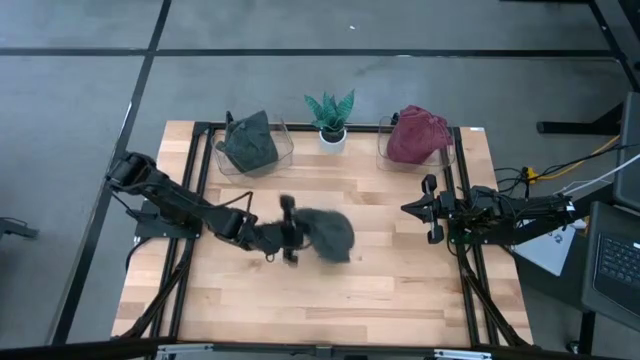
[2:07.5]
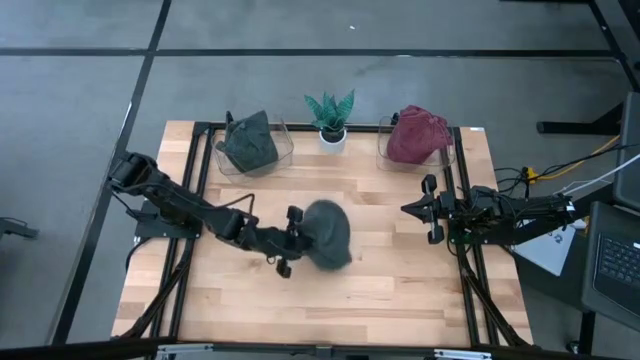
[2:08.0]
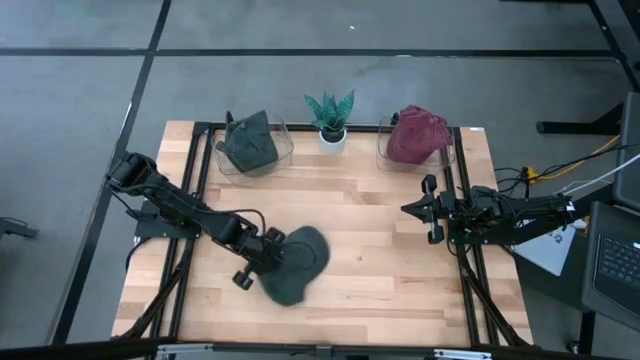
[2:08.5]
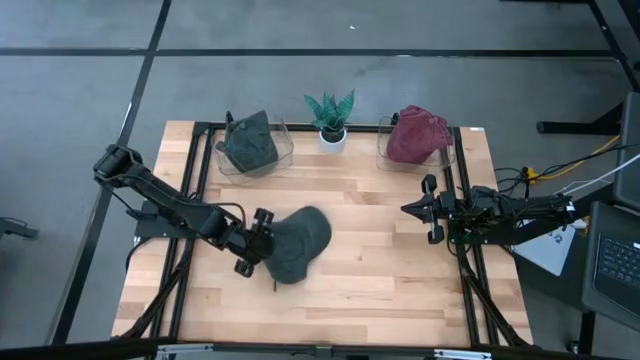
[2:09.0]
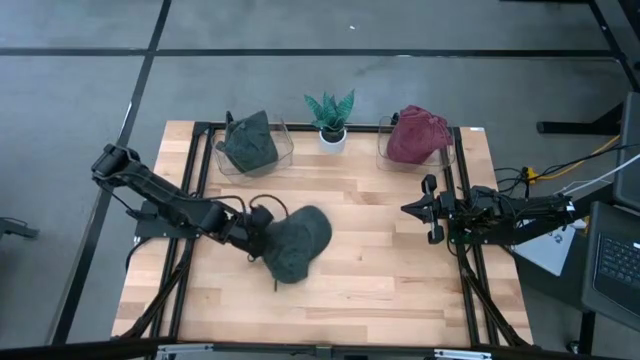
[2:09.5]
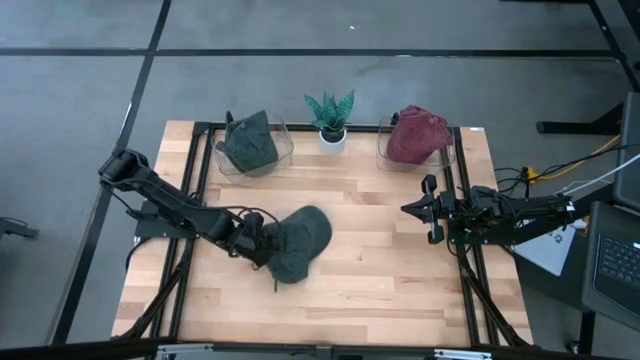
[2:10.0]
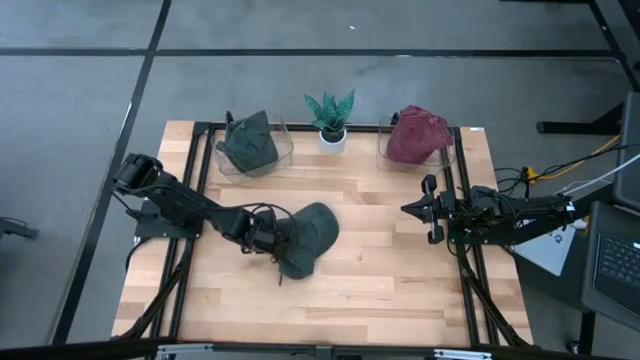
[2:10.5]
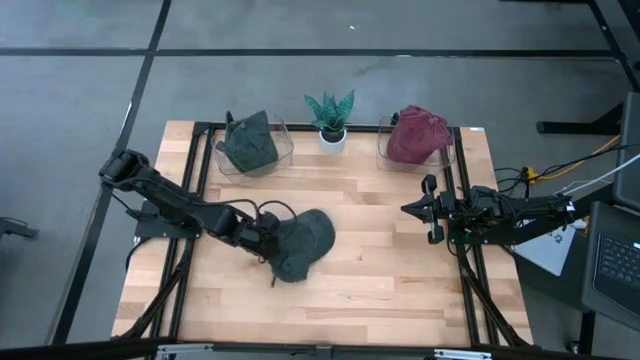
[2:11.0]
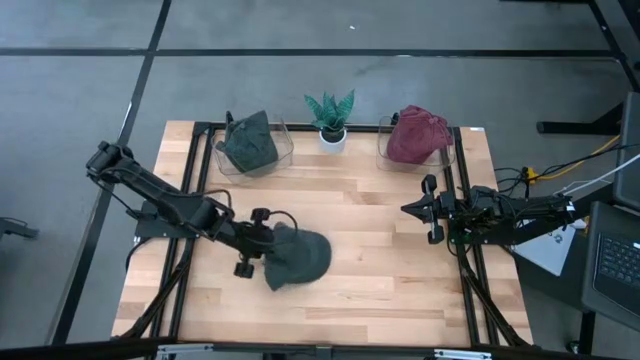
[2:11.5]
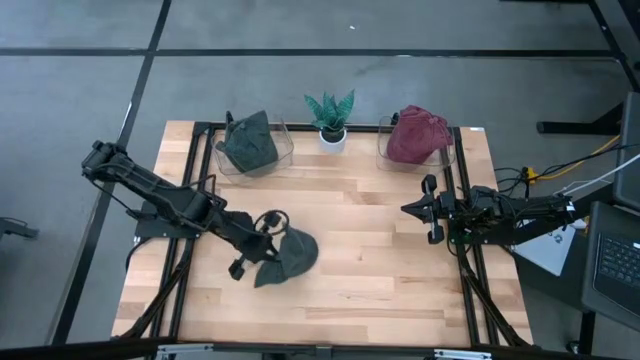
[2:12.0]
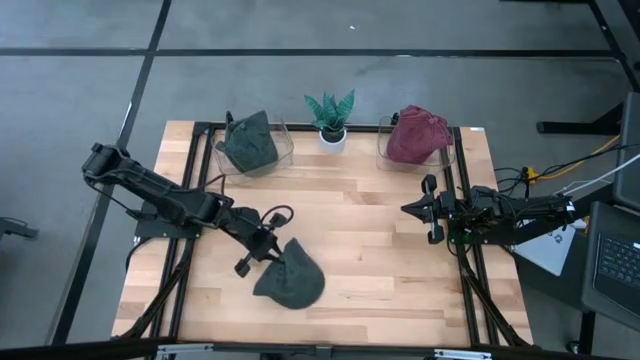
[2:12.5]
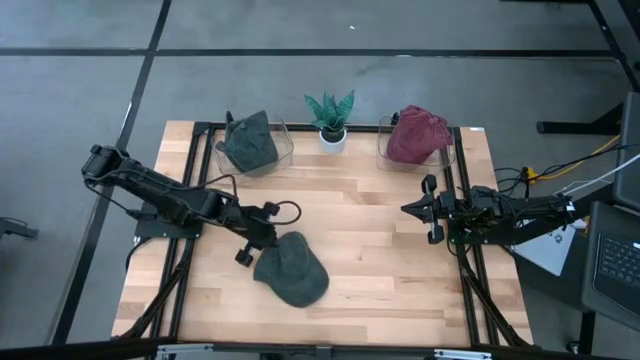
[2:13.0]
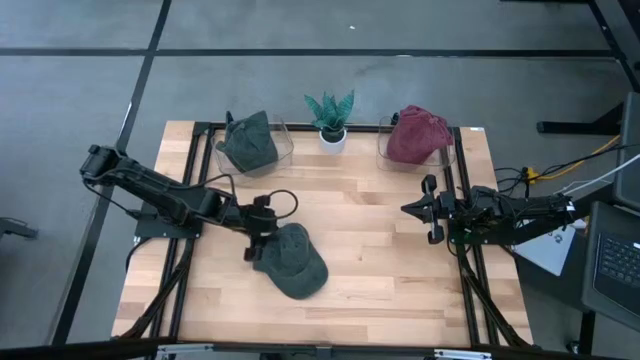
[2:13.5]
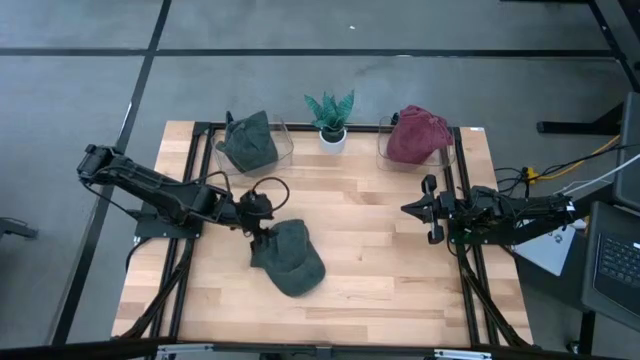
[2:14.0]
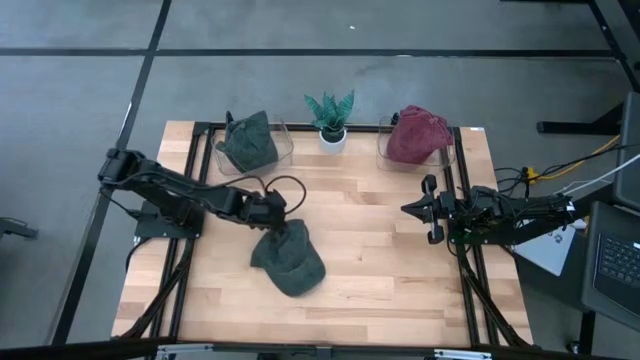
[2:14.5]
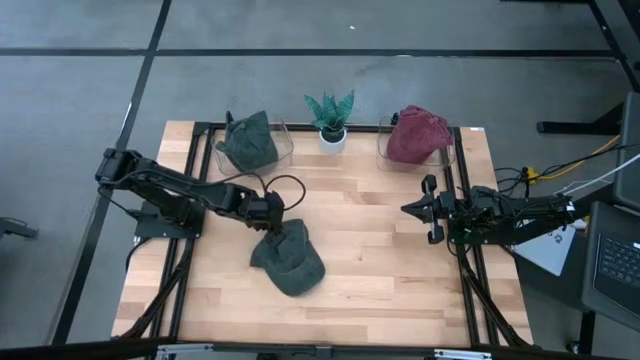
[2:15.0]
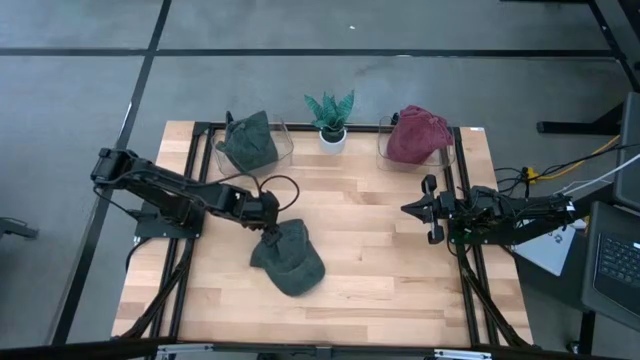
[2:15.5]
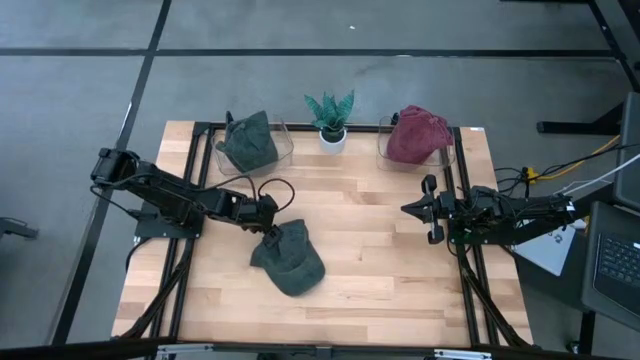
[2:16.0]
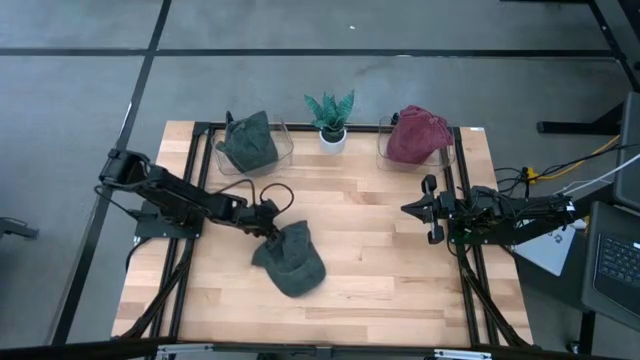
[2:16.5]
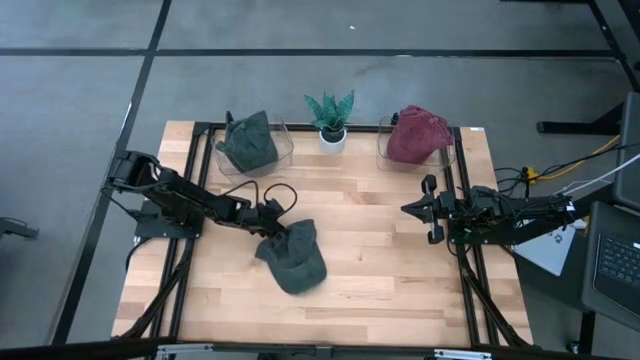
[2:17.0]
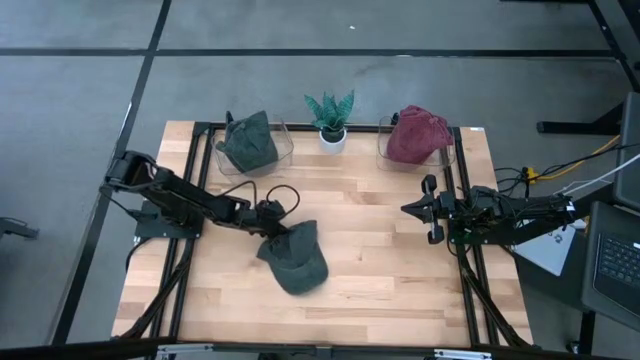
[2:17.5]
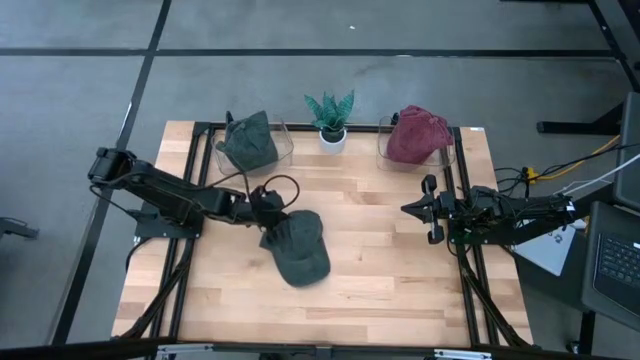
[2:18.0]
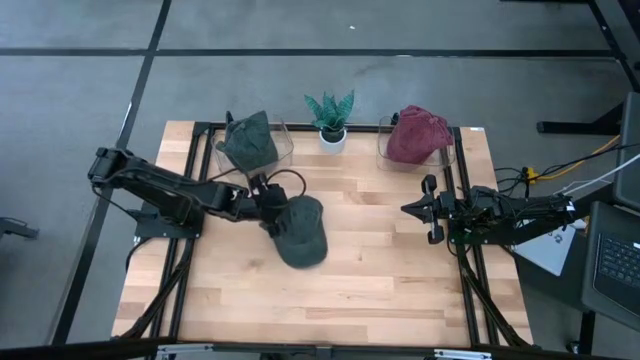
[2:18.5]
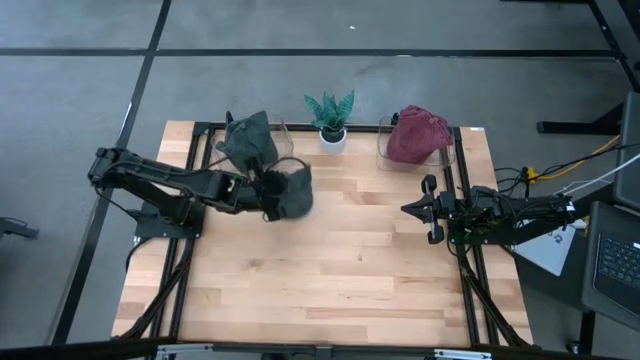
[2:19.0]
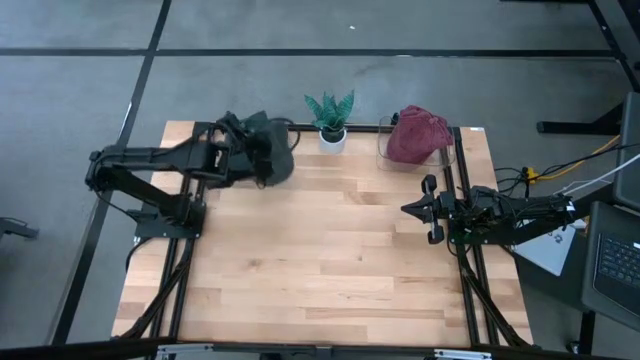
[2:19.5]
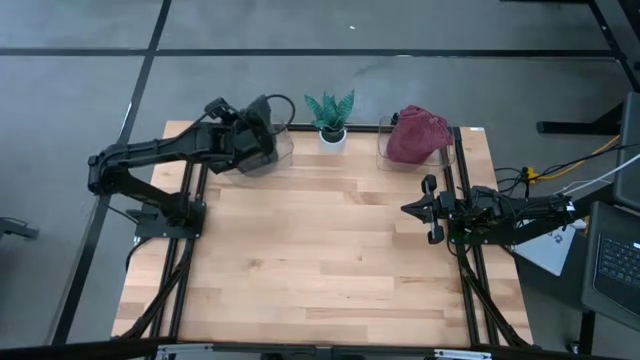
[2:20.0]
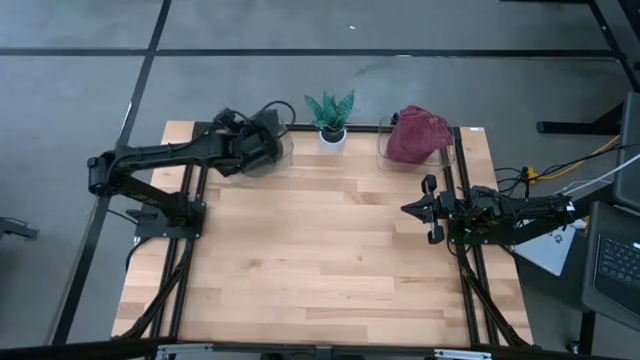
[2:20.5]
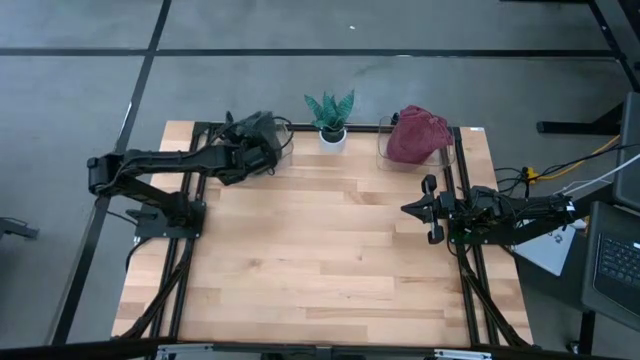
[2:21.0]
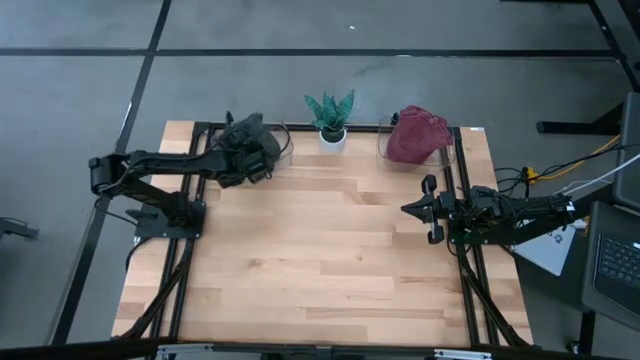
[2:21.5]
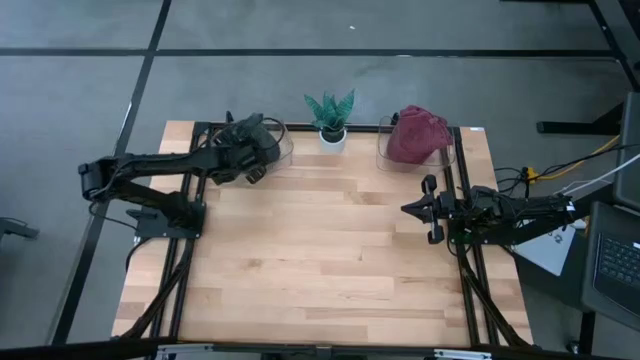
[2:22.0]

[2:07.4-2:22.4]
Task: Pick & Place hat
Put the black cap into the left transparent bin

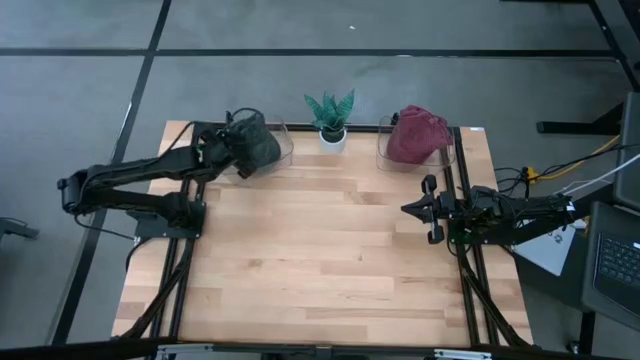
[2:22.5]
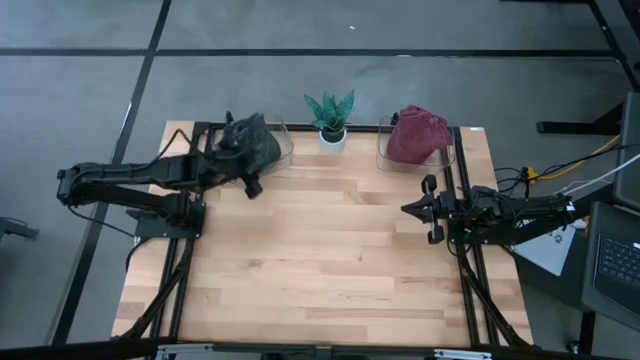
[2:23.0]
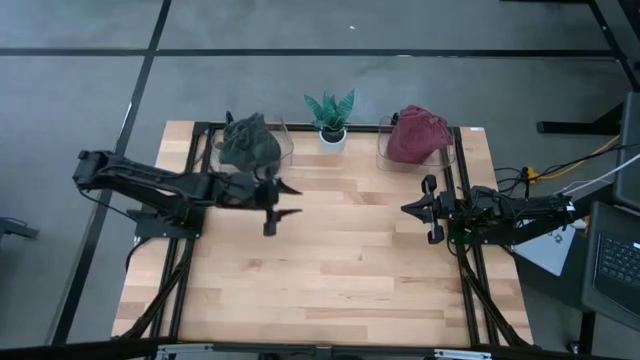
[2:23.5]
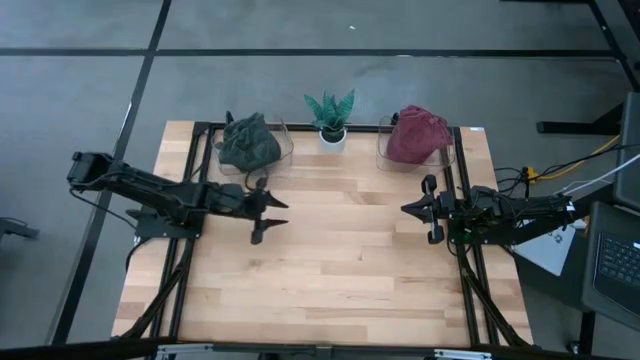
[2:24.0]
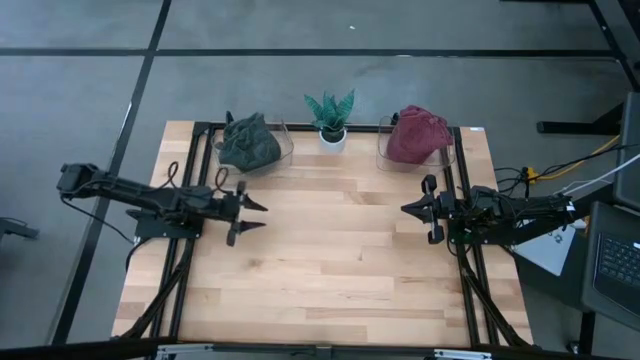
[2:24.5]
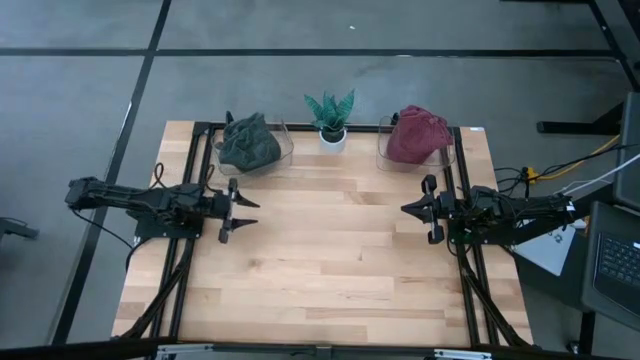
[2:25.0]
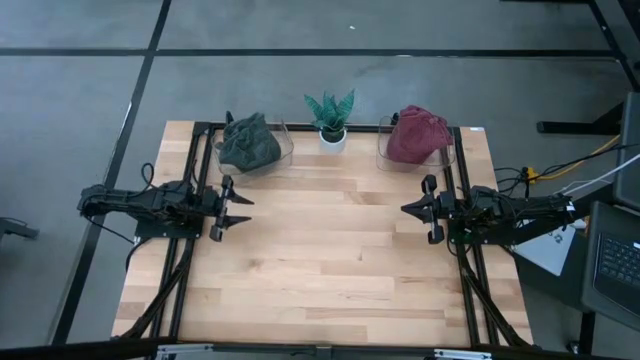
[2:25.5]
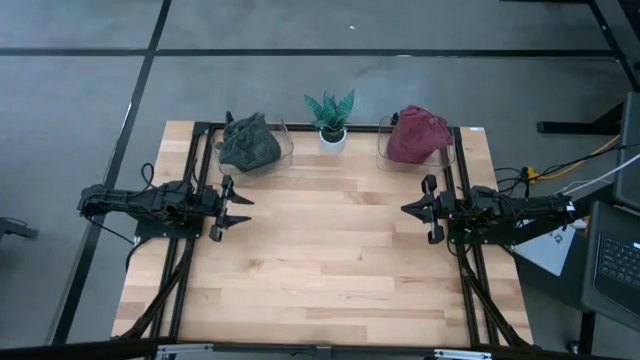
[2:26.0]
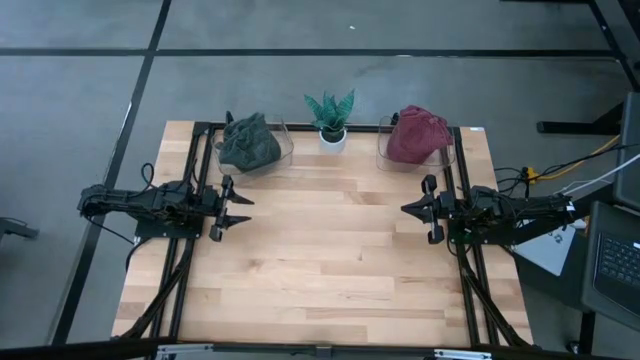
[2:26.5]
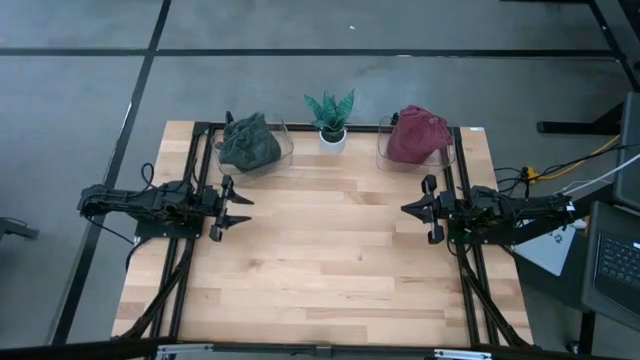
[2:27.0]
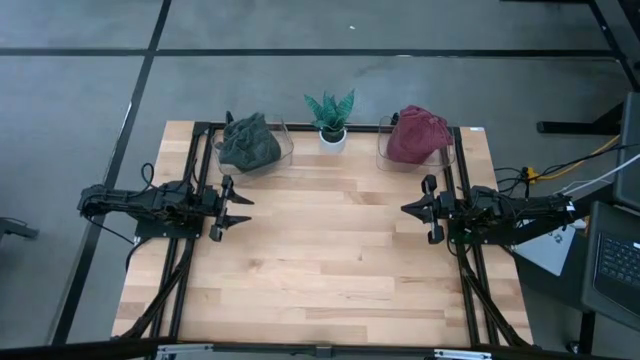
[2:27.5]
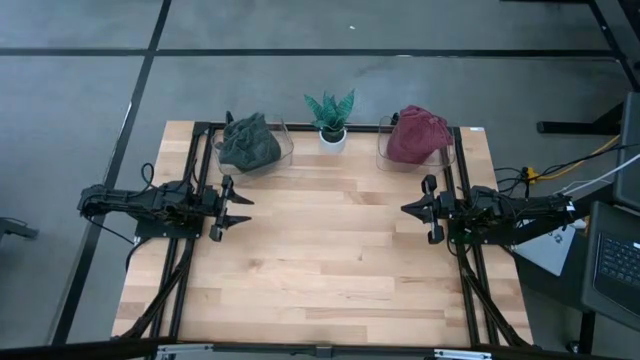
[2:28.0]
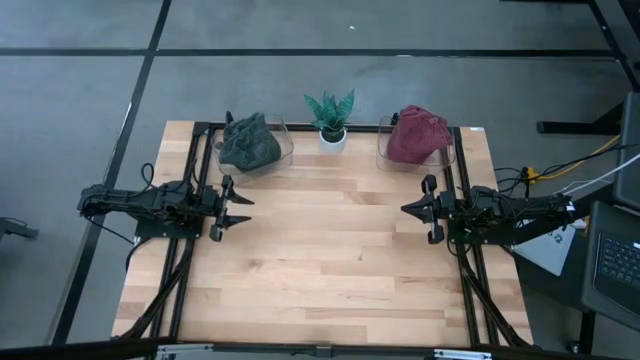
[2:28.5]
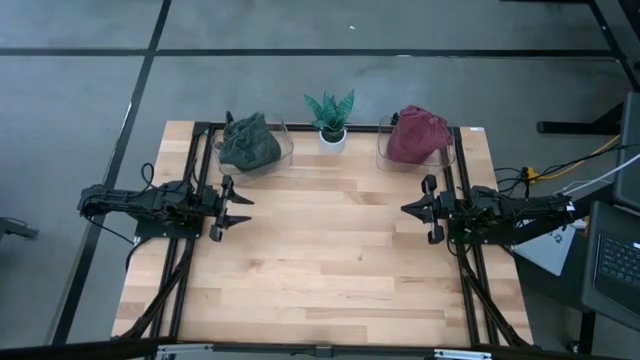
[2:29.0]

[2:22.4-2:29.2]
Return to Home Position

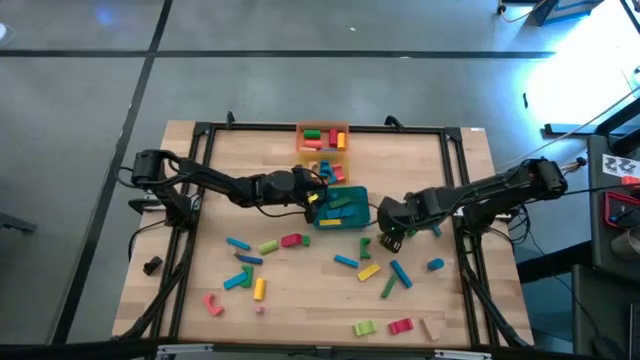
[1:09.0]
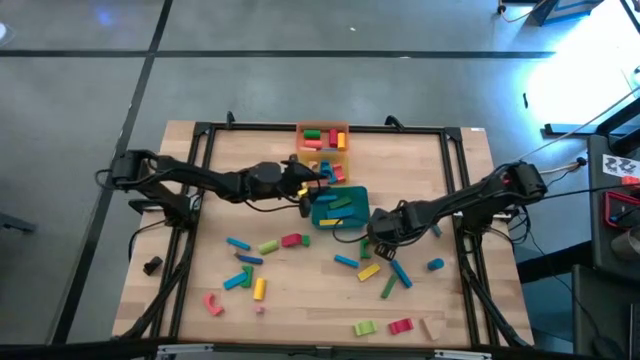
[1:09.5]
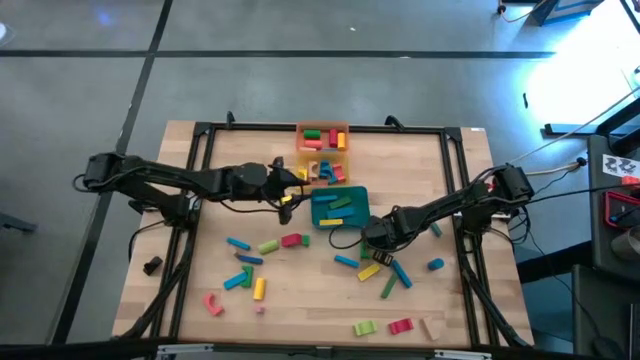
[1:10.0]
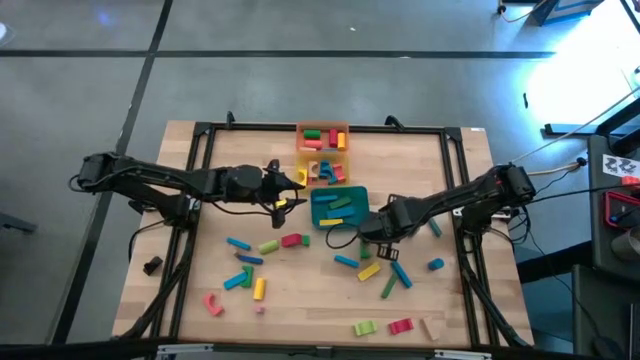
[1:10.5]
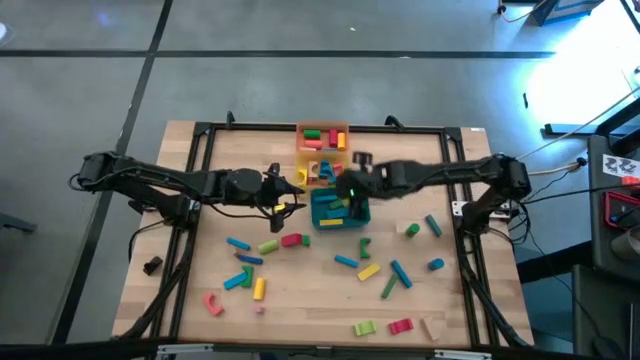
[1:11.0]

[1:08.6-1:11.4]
Task: Sort blocks by size
Put the light green arch block into the yellow bin
